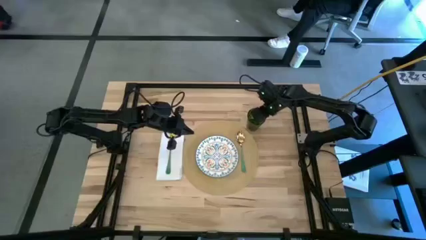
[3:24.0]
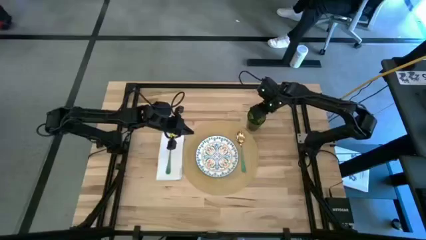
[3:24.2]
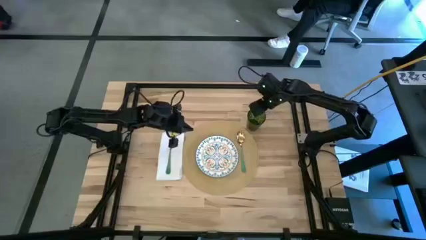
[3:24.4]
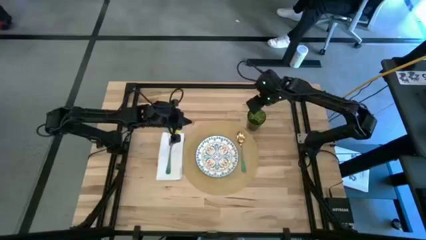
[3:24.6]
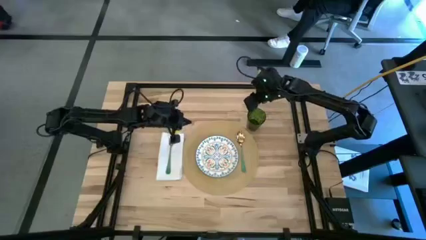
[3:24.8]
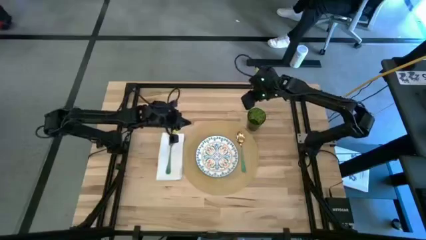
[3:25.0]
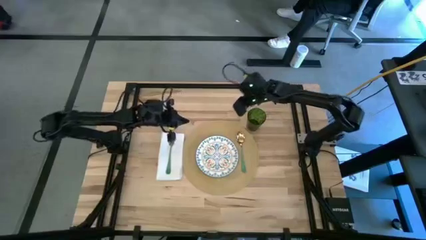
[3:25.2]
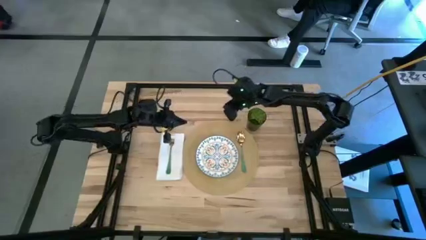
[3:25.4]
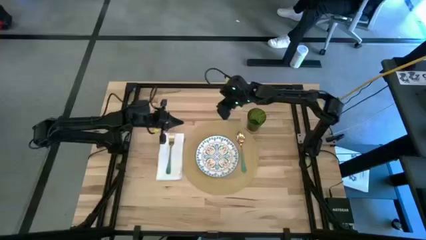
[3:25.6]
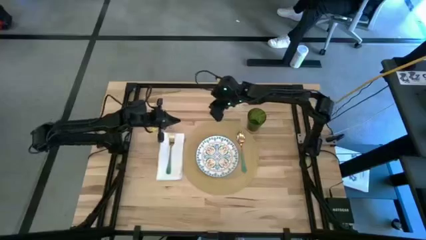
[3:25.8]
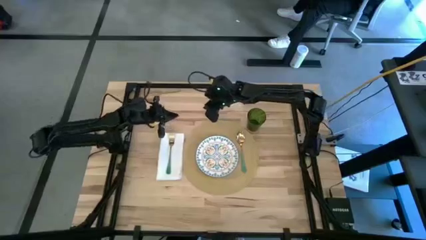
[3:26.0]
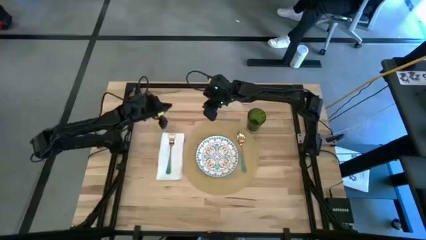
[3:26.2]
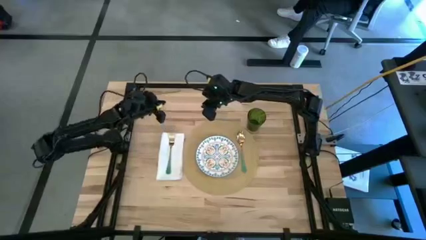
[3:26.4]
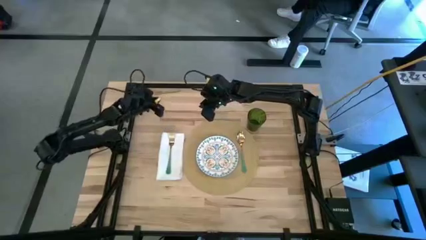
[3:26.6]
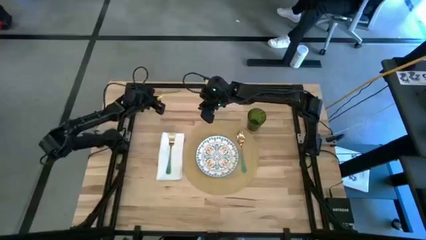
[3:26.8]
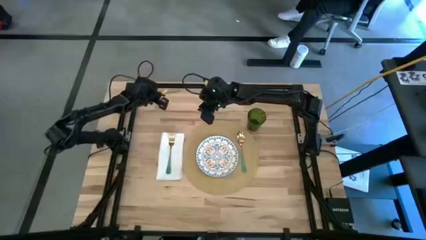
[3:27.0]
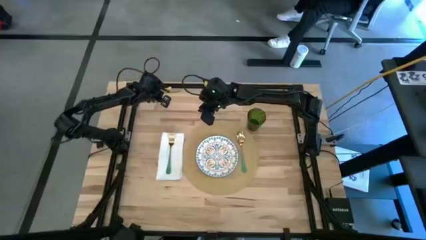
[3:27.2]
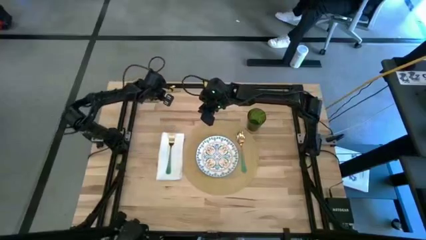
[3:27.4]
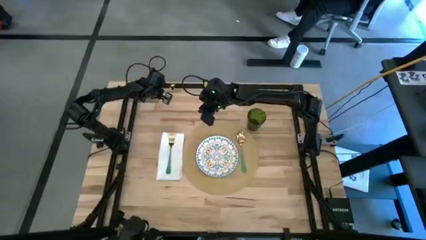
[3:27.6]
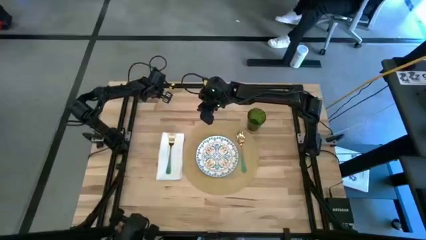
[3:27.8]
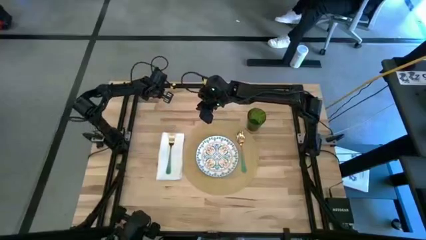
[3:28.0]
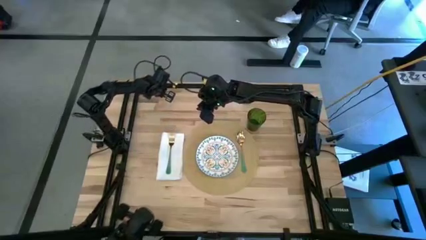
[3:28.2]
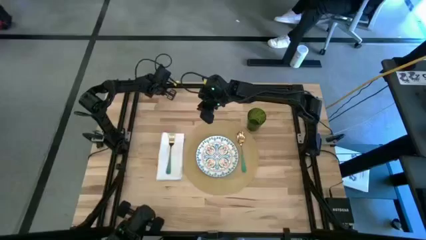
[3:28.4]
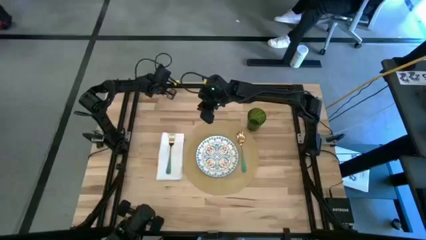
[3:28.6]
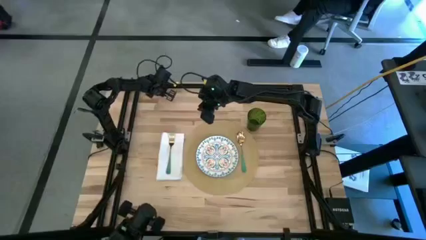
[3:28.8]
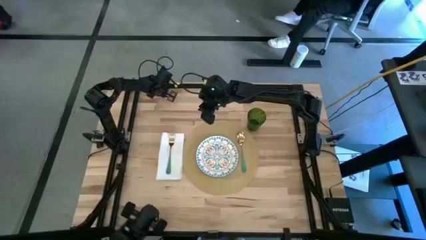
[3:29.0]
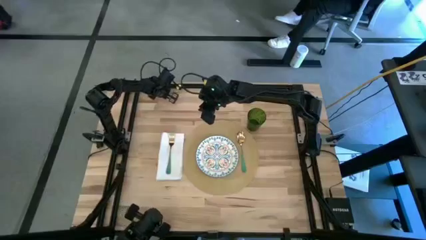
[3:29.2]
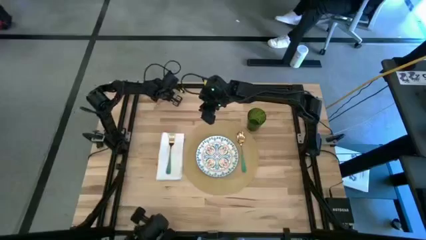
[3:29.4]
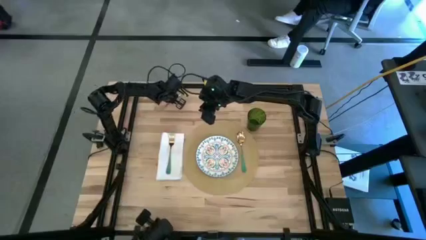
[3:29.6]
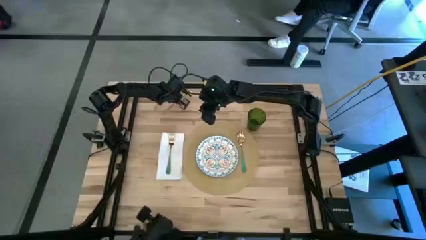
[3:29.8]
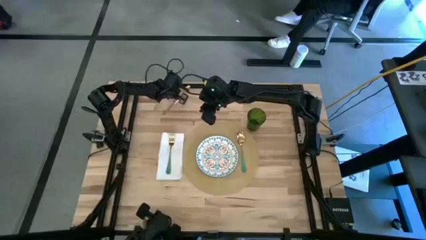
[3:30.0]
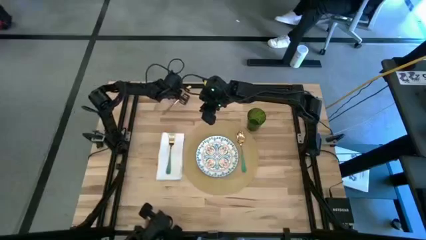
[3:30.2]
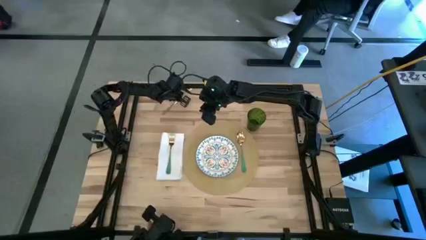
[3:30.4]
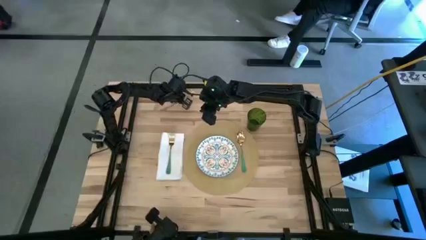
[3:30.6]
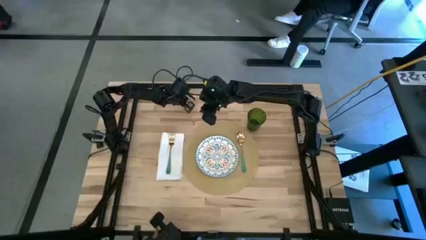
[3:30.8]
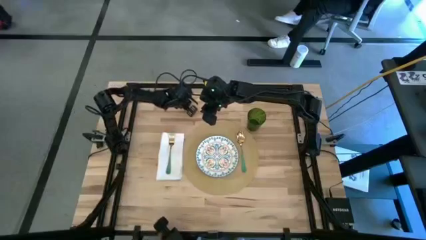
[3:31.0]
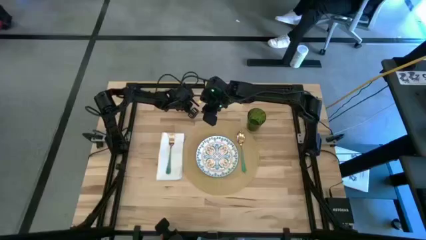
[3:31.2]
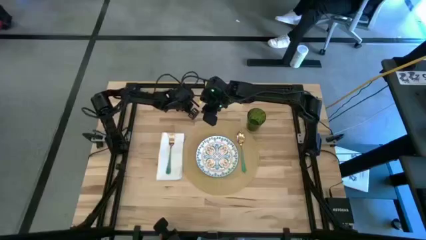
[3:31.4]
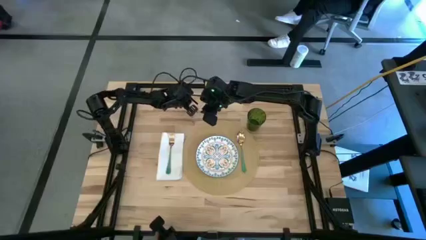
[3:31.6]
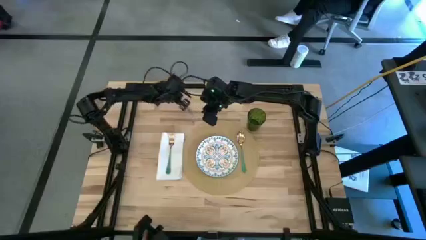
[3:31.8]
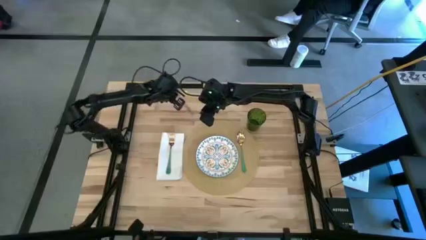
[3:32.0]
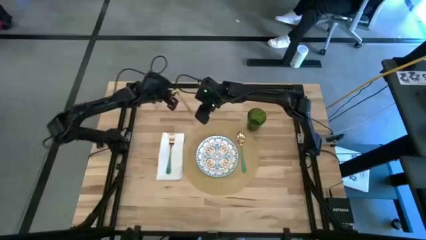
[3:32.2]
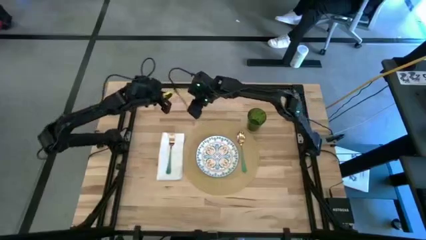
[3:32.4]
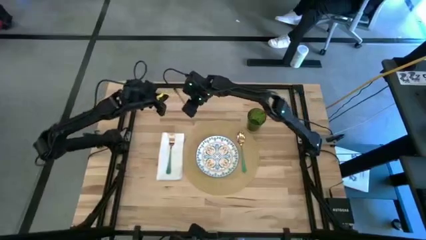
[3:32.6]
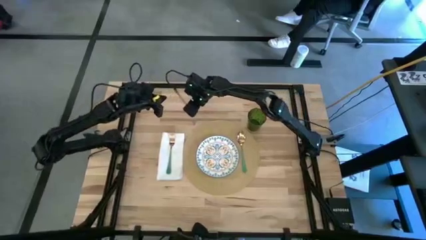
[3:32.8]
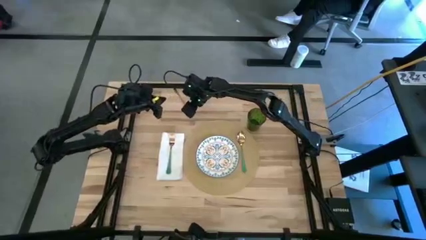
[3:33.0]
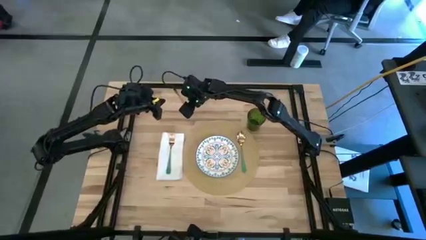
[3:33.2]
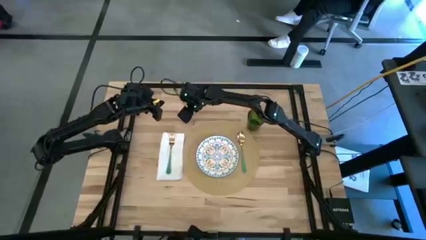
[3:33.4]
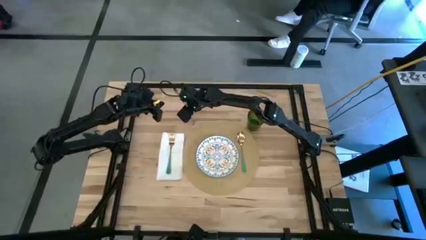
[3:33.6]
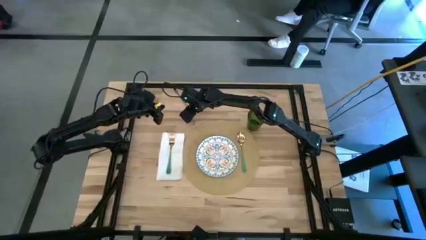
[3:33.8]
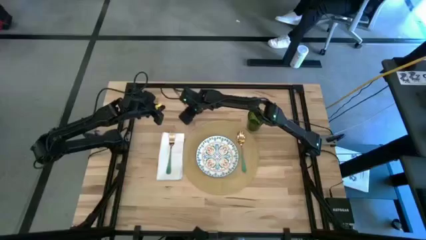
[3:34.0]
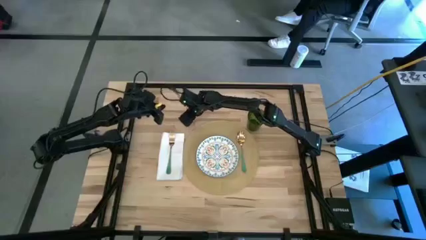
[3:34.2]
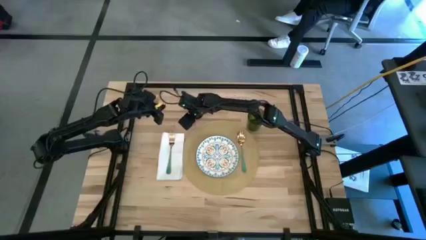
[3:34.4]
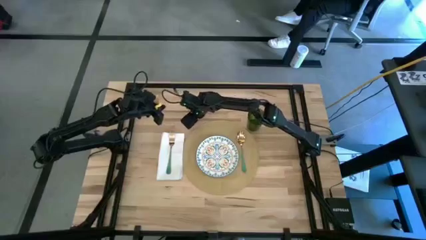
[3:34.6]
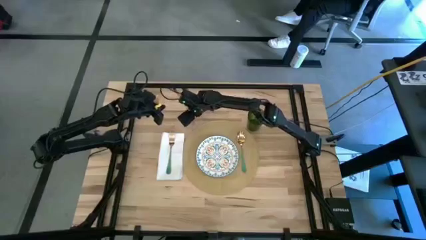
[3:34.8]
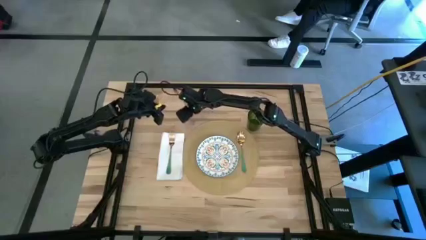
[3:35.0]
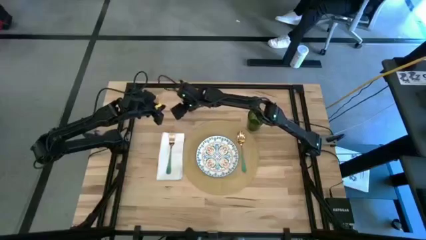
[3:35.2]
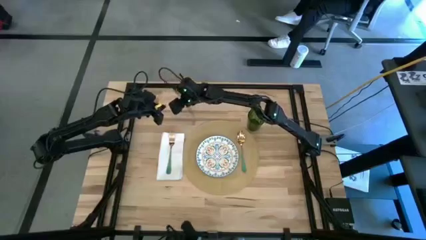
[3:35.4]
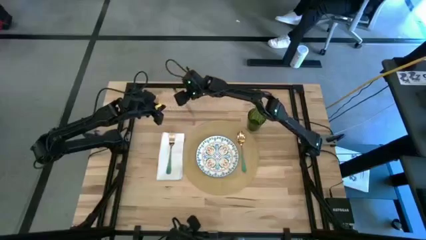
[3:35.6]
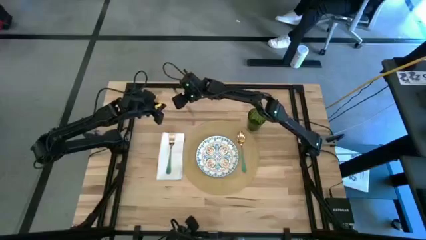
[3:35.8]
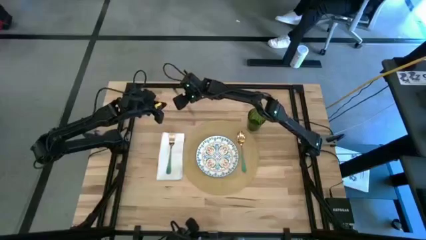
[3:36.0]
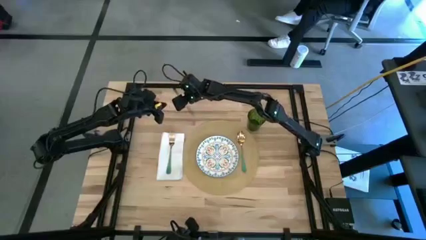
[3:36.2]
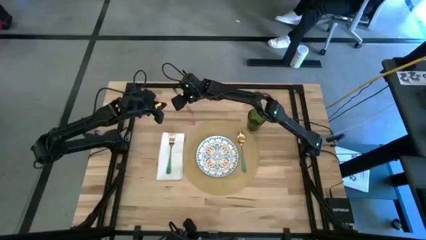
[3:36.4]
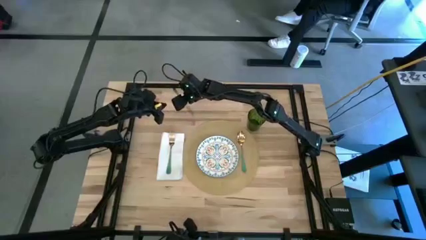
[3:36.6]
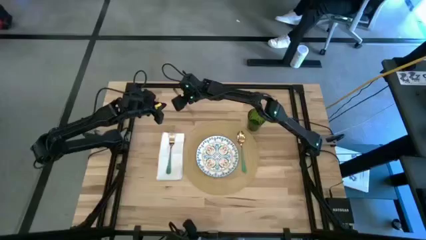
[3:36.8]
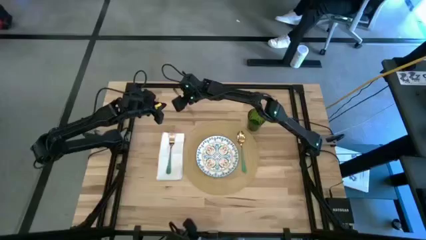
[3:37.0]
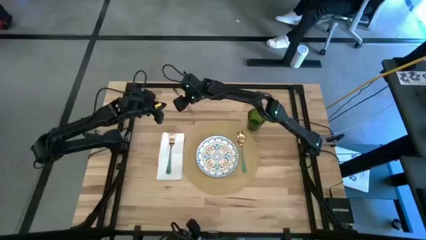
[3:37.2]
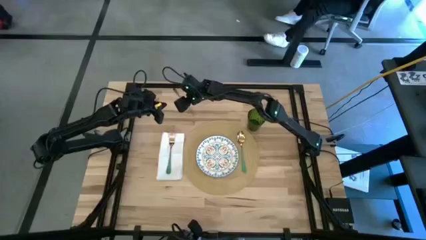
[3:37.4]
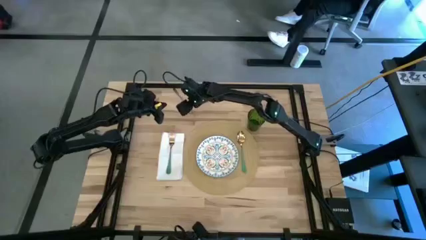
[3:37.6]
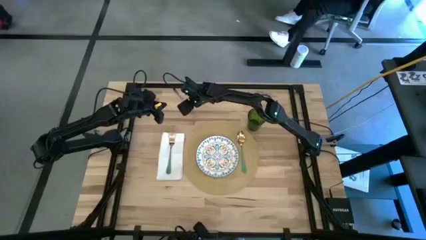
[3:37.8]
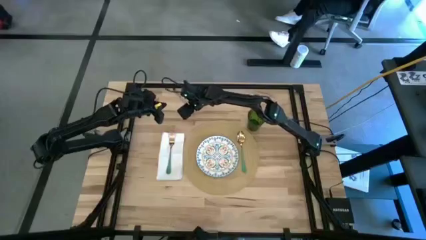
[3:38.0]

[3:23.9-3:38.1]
Task: Set table place
Put the gold table knife to the right of the green spoon on the brown place mat
